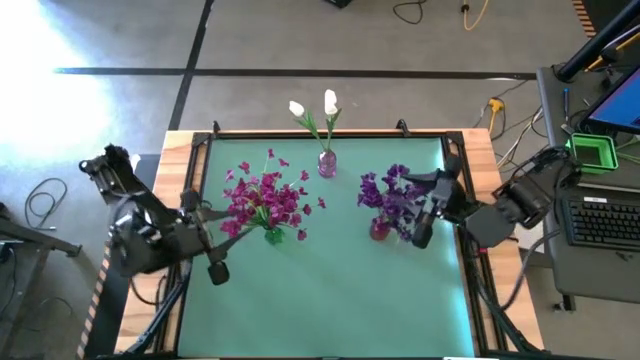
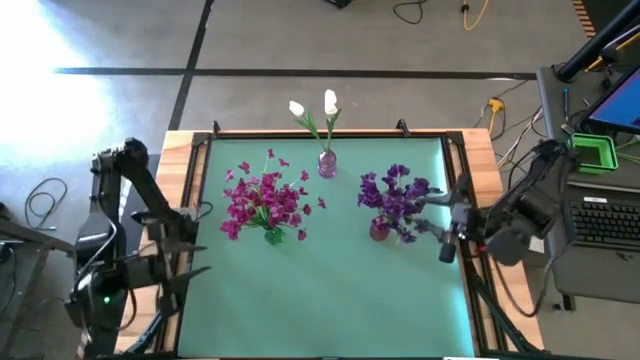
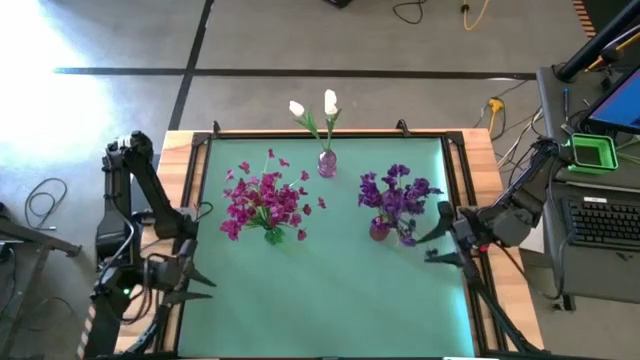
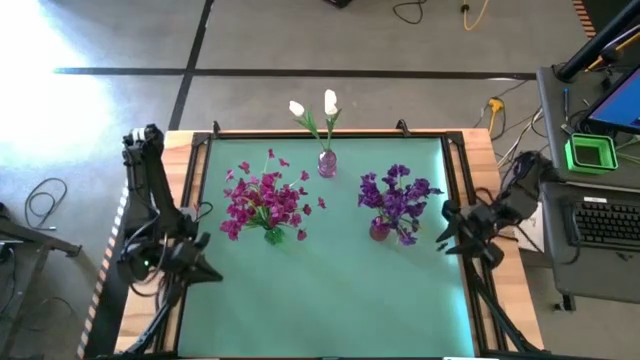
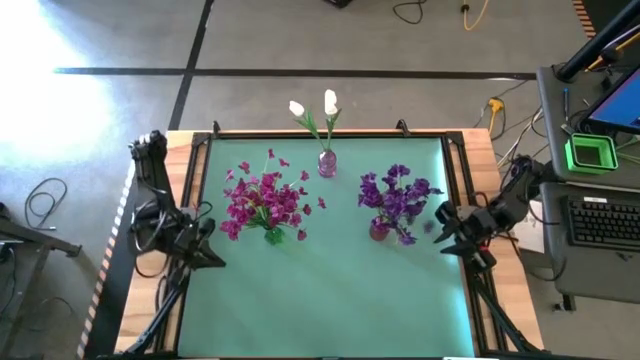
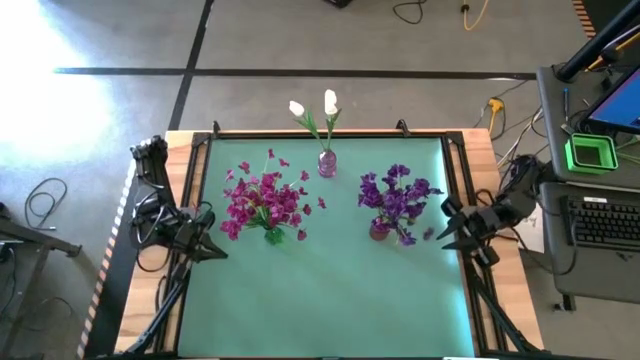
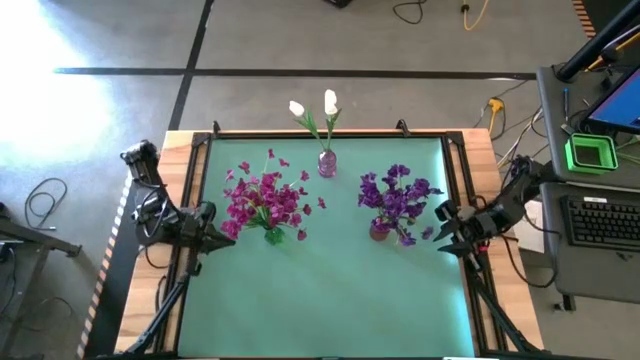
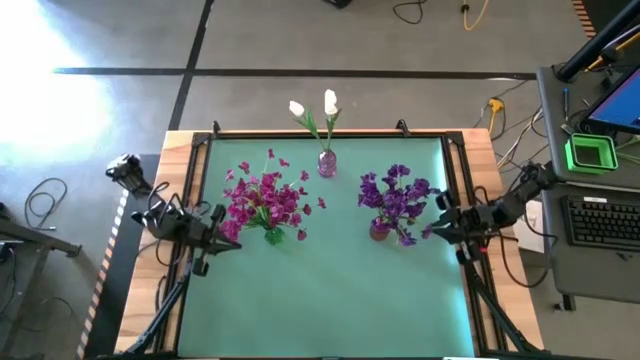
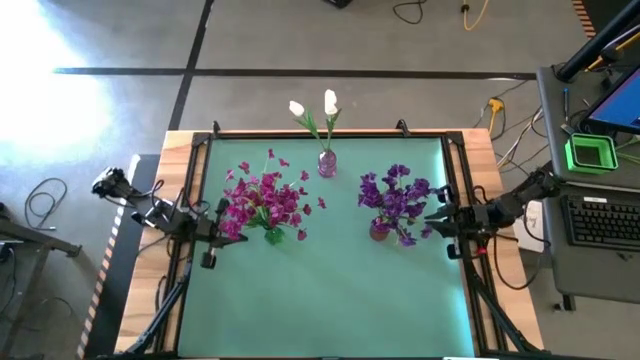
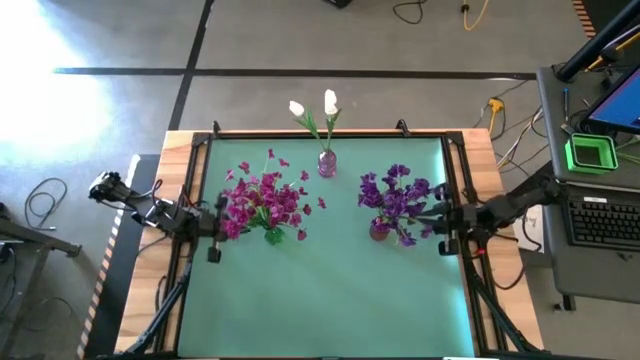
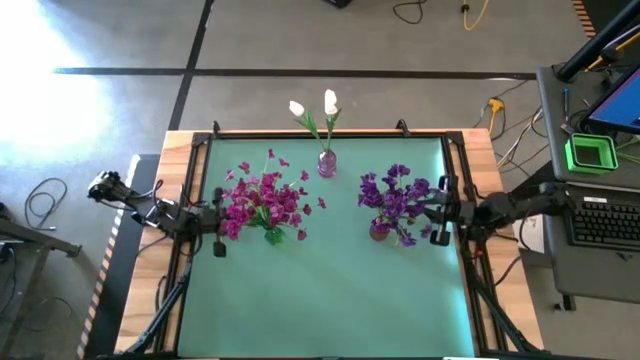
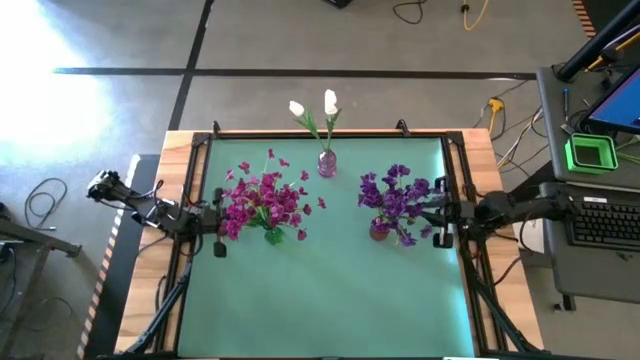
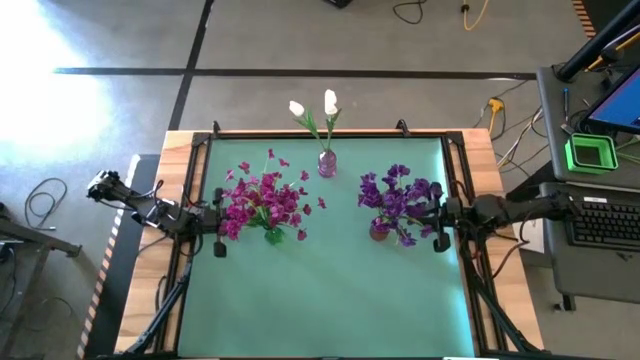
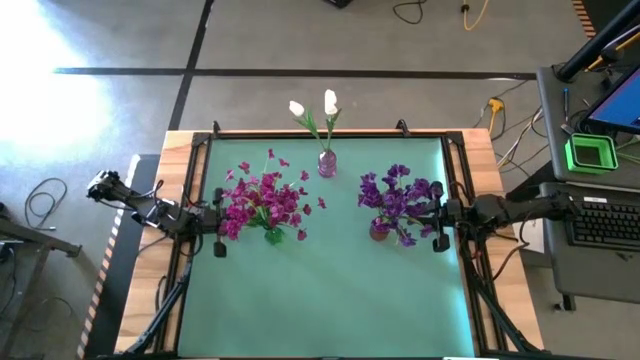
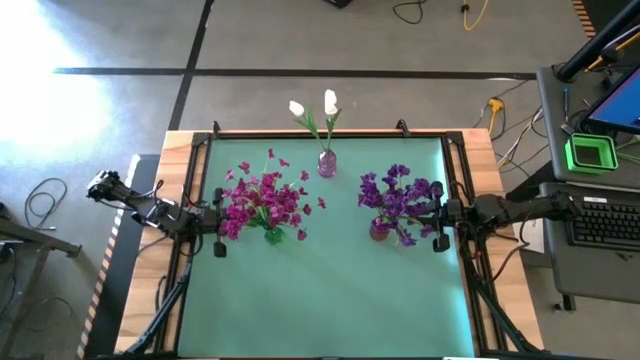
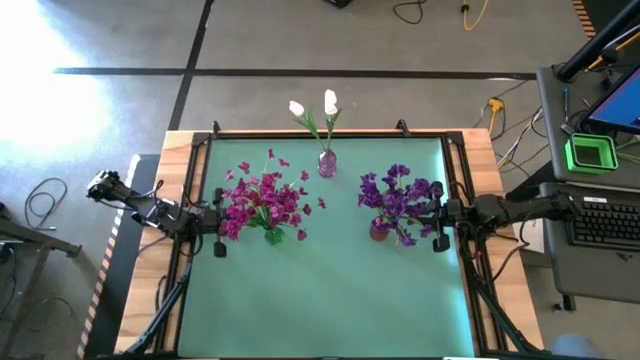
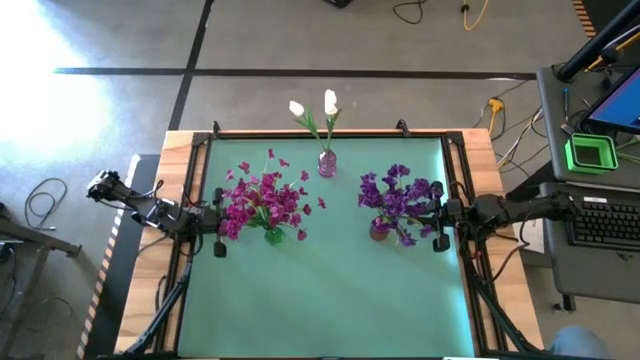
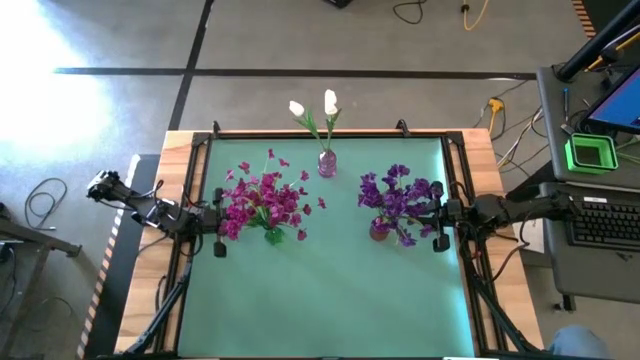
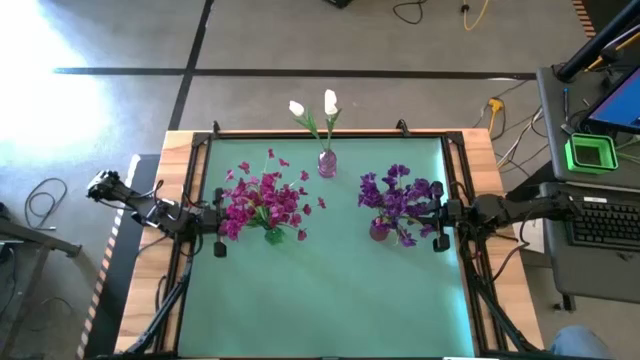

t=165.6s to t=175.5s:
Task: Sort flowers into vase by color
Return to Home Position

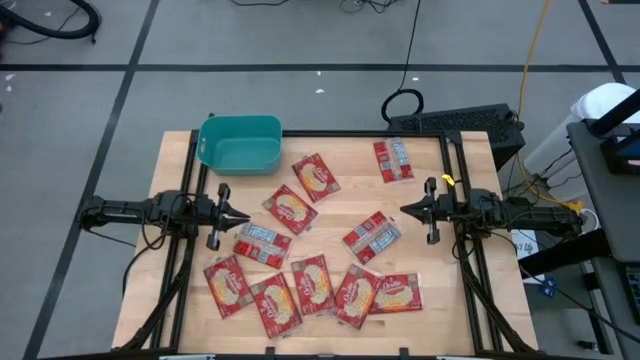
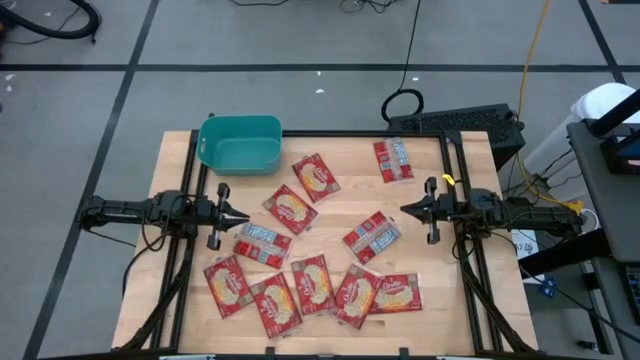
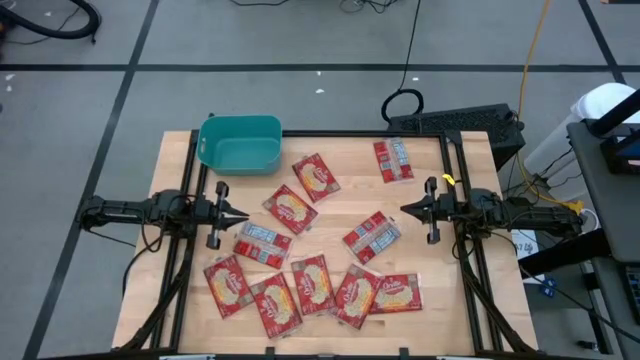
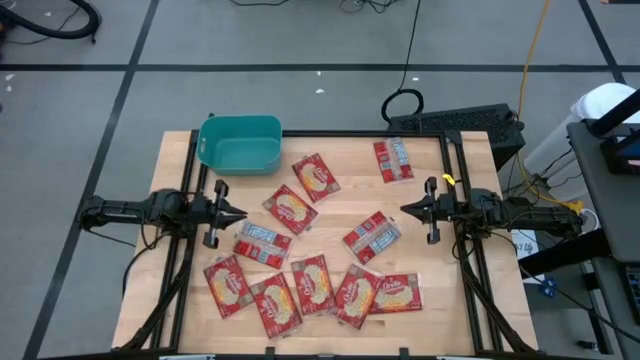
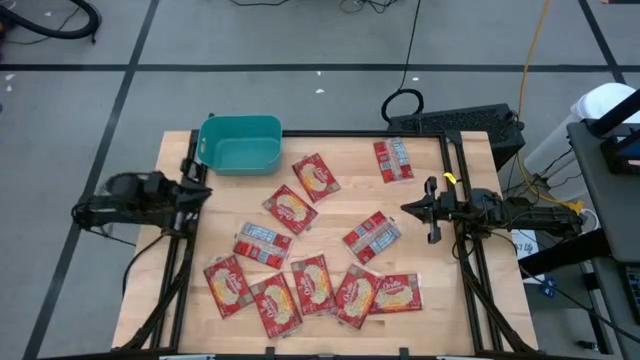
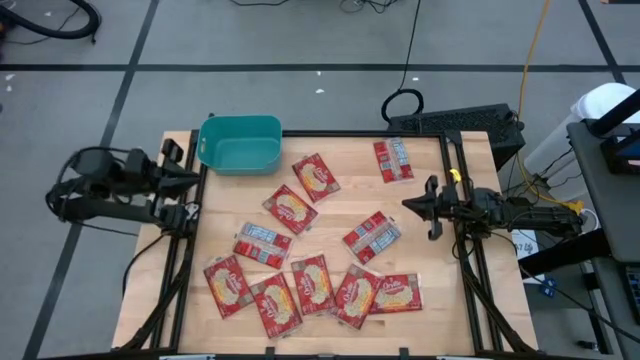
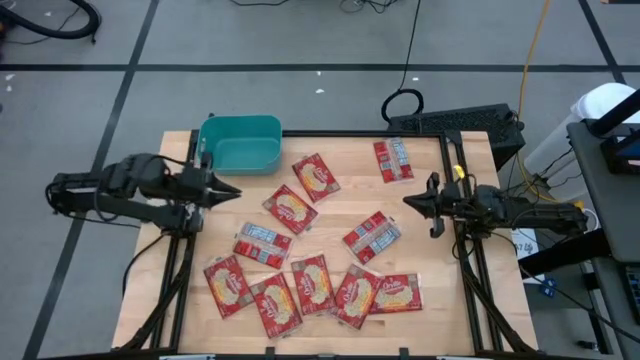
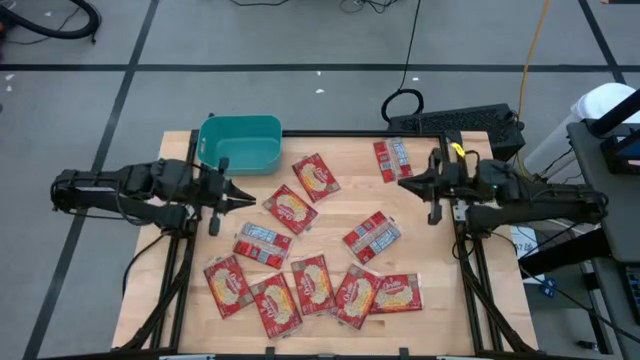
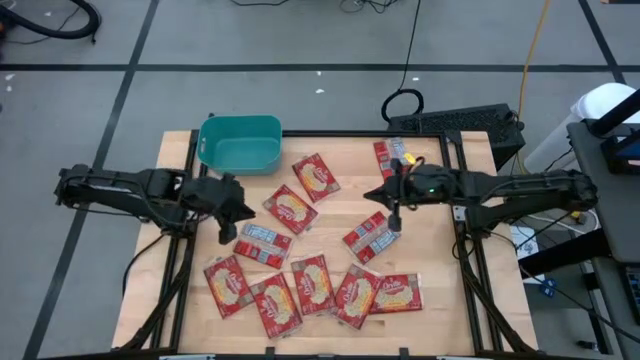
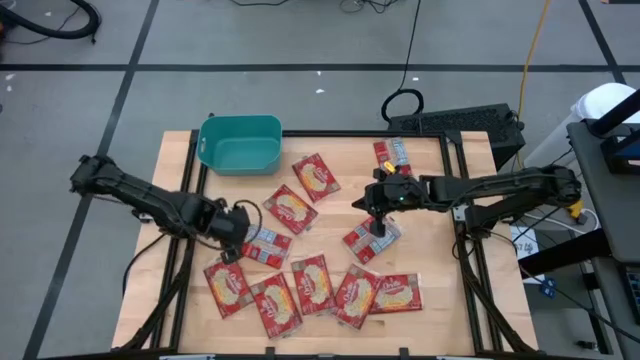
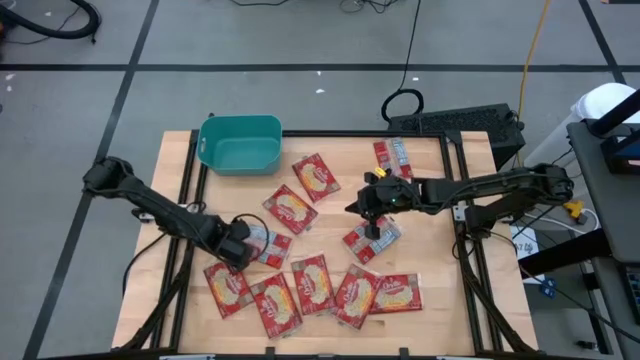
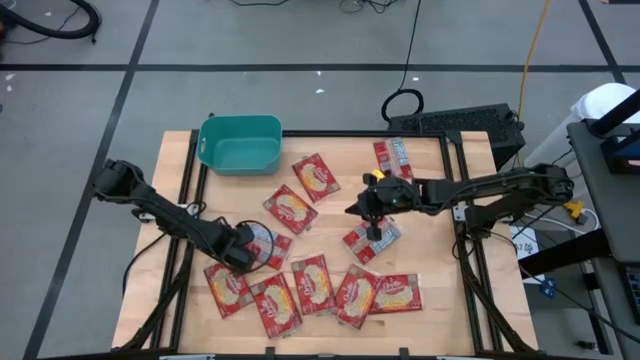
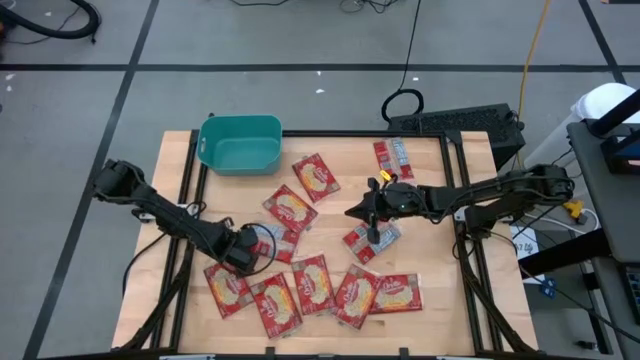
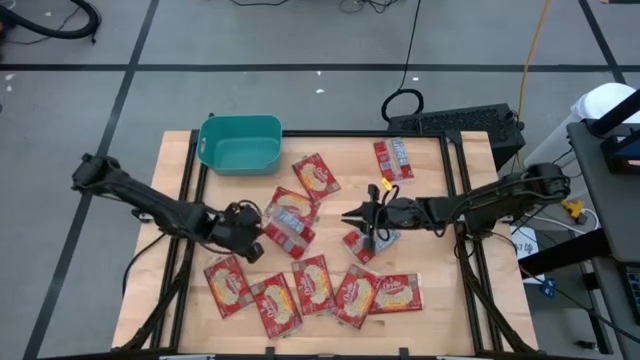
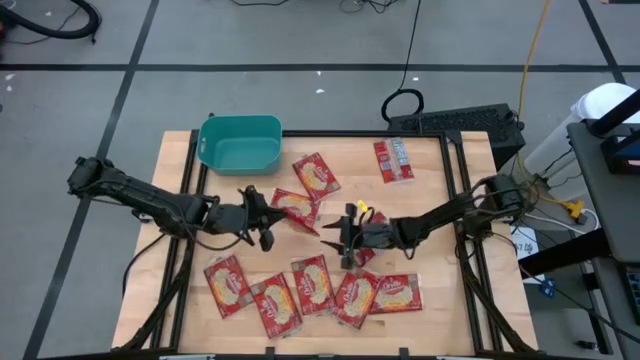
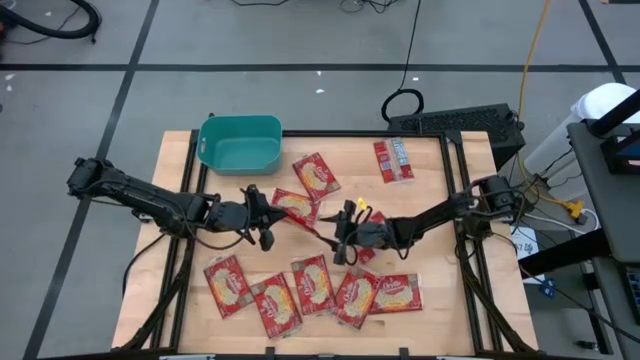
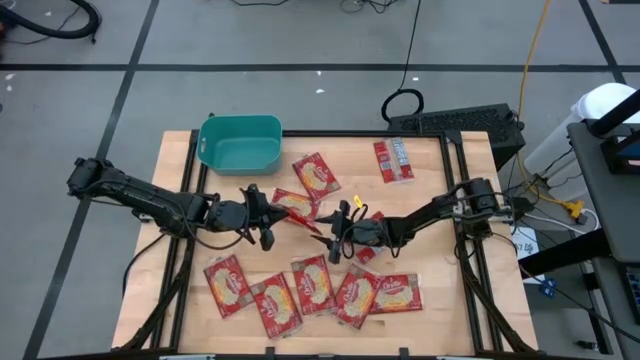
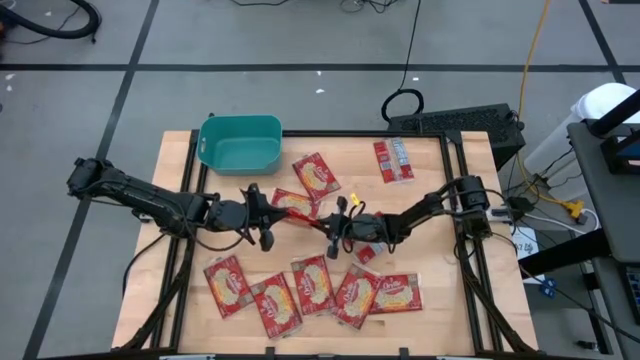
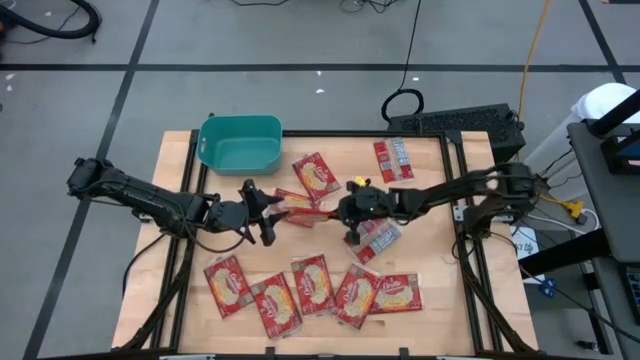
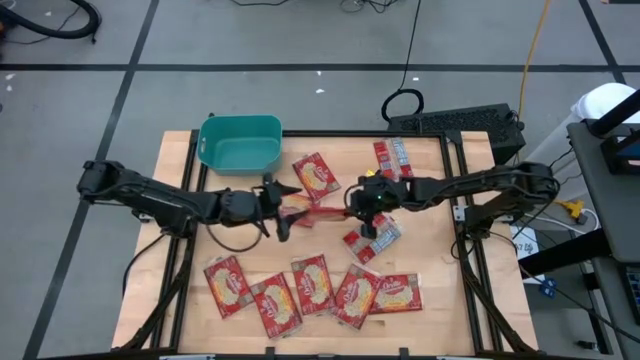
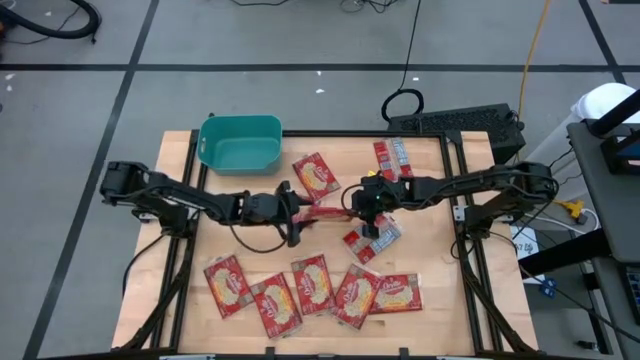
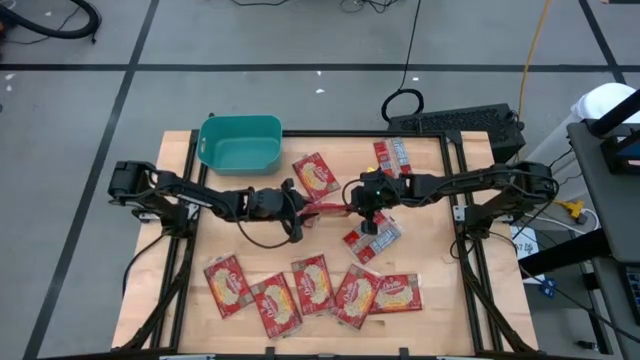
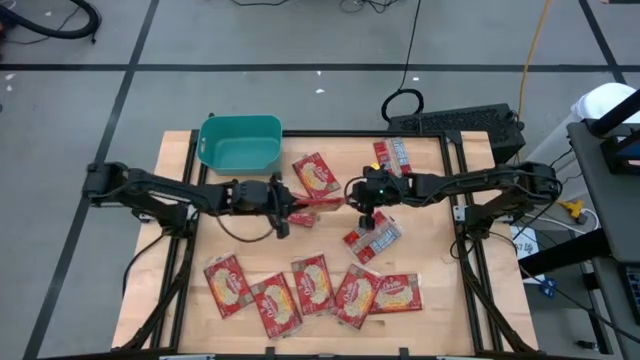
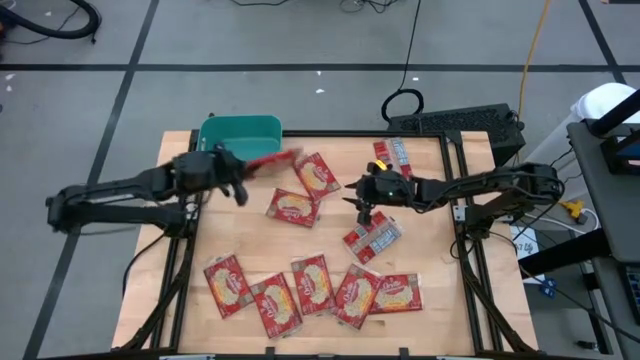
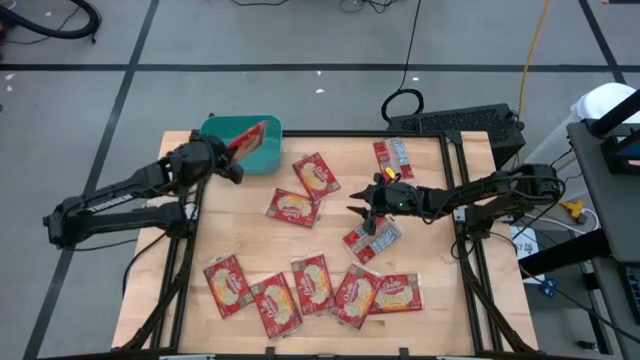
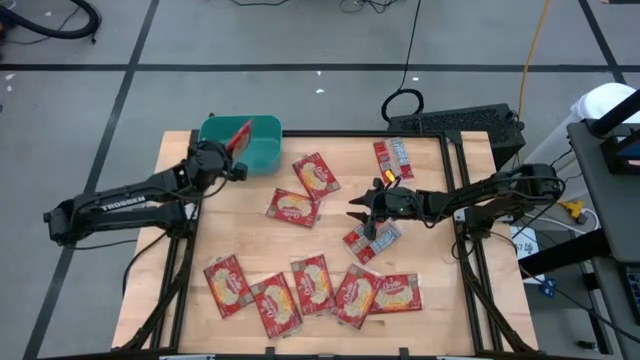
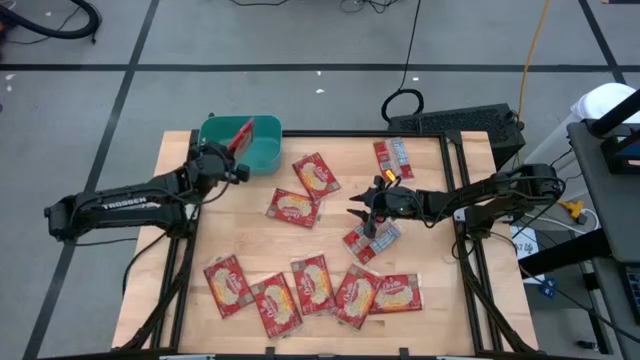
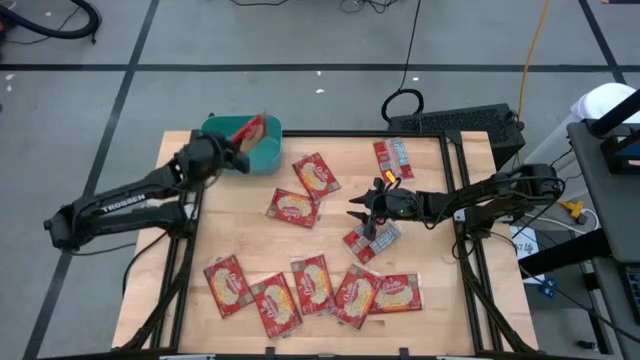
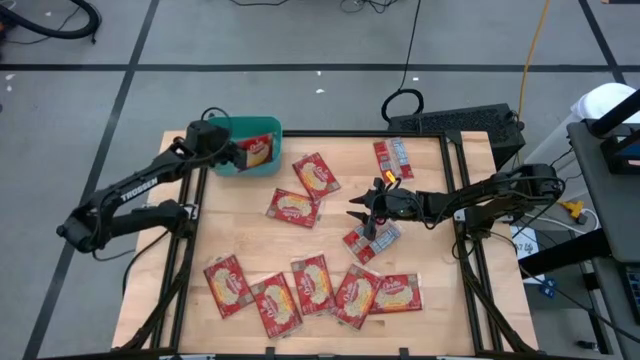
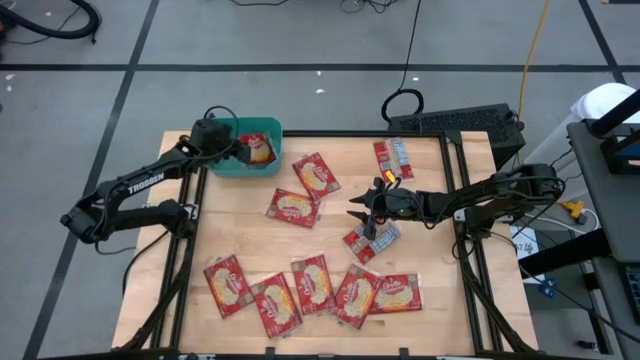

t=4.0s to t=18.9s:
Task: Sort popcorn bags into baskets
Put the red popcorn bag into the green bin
